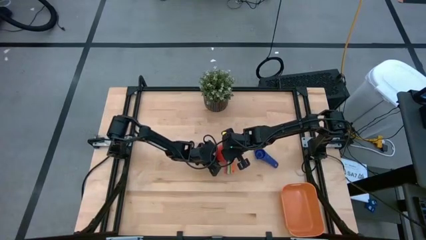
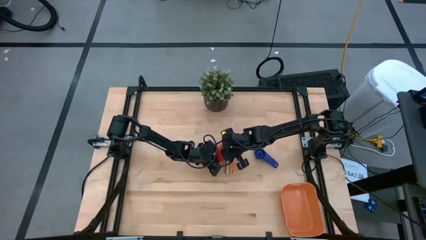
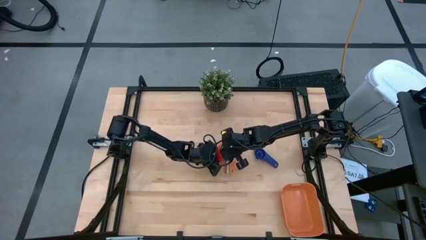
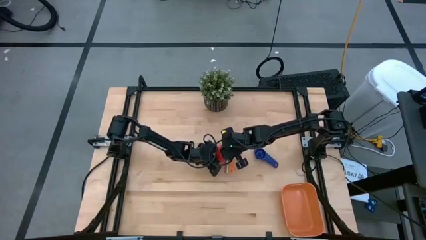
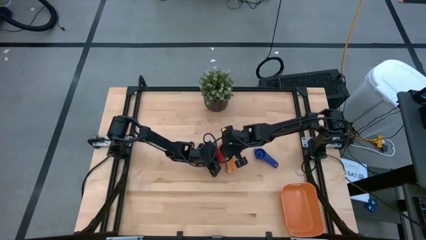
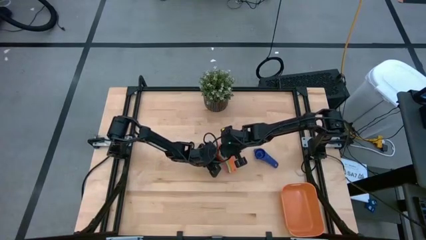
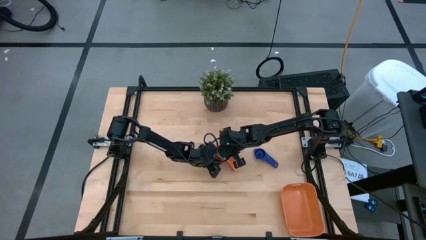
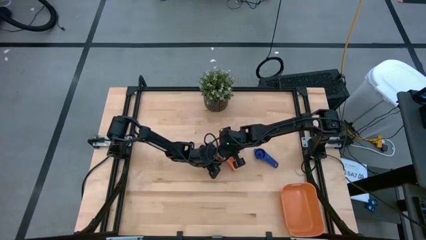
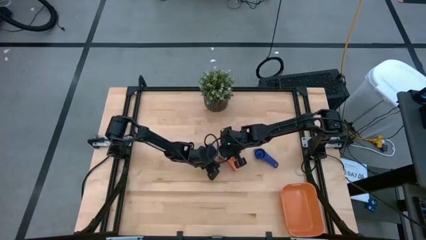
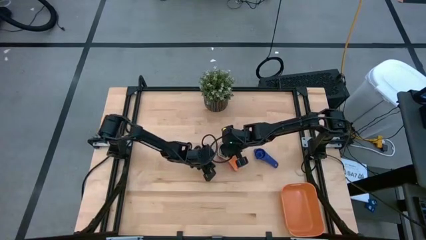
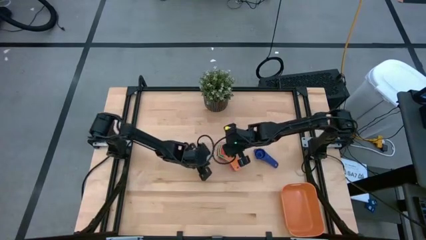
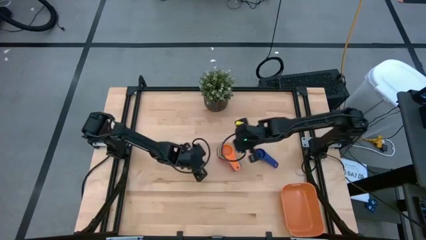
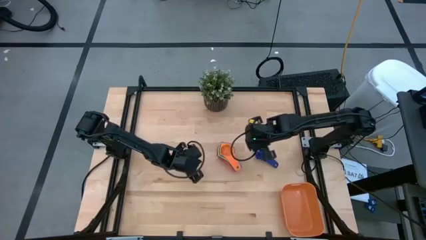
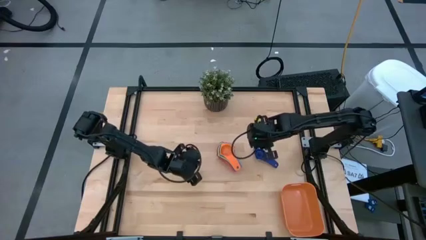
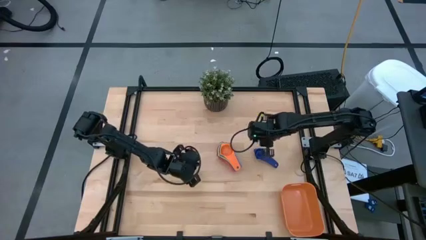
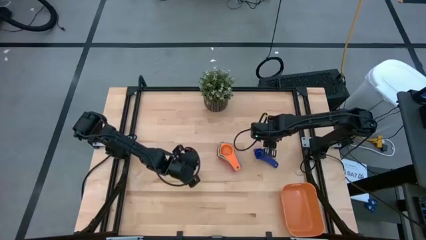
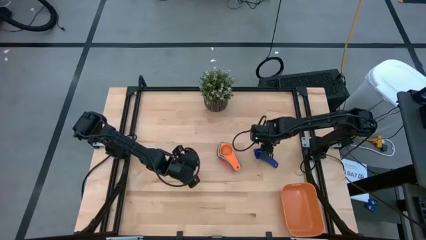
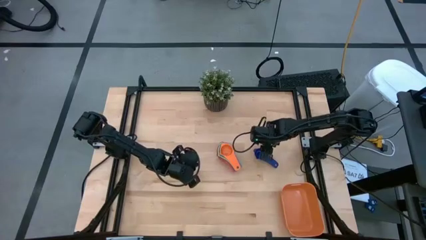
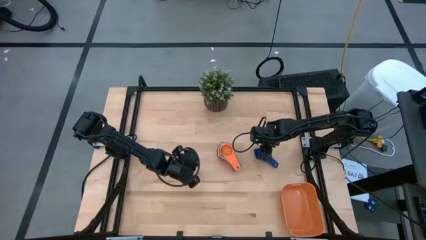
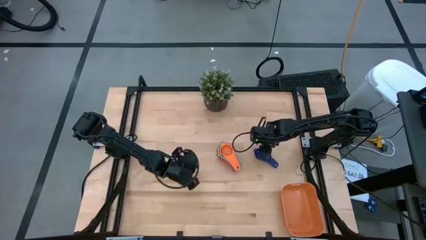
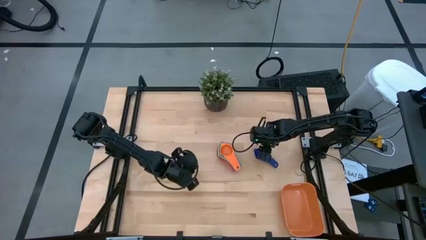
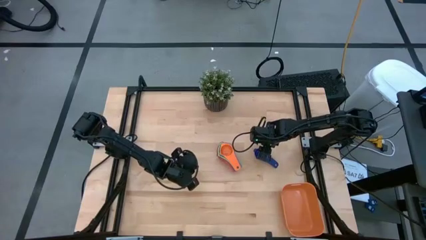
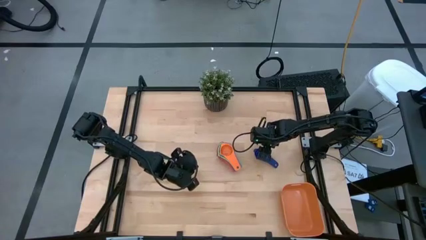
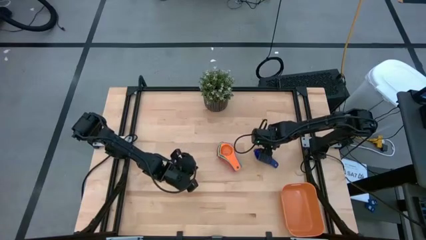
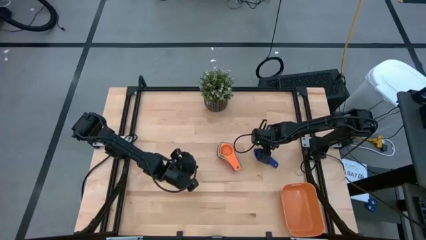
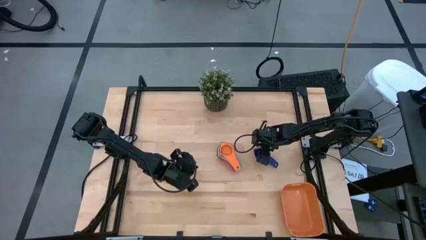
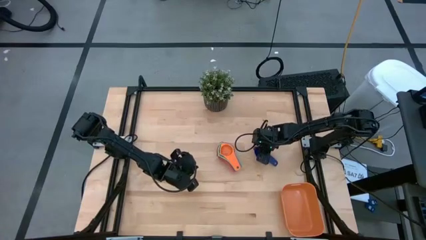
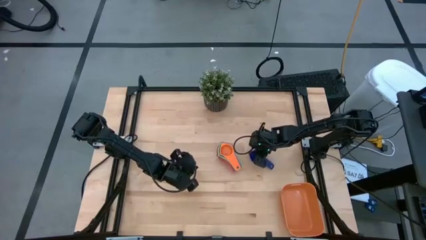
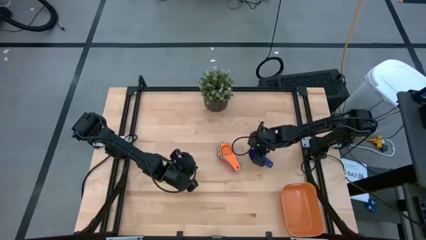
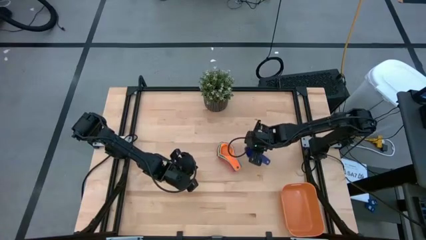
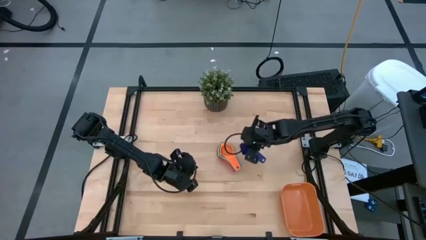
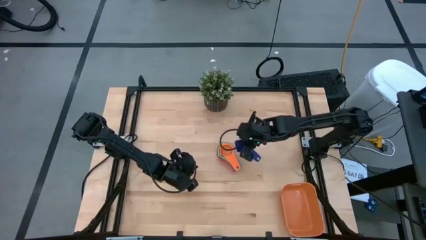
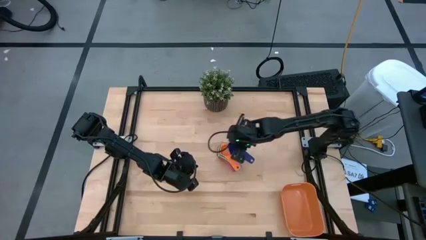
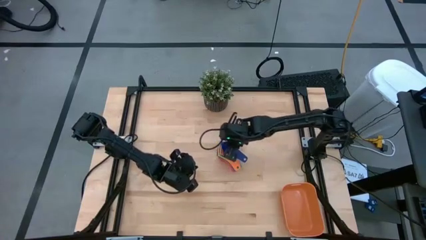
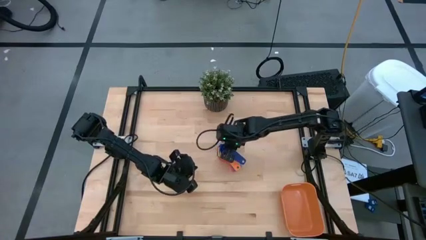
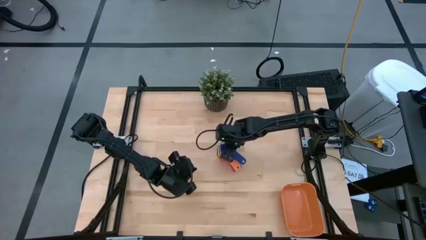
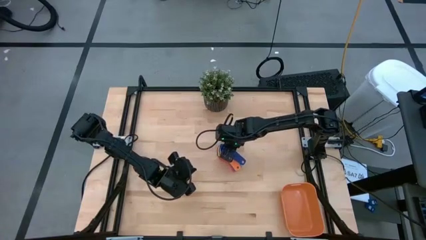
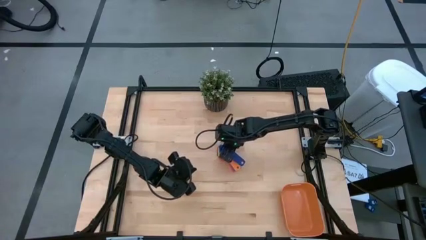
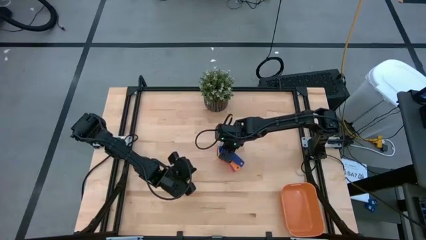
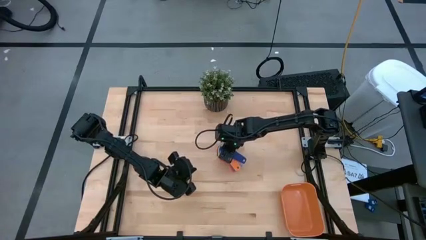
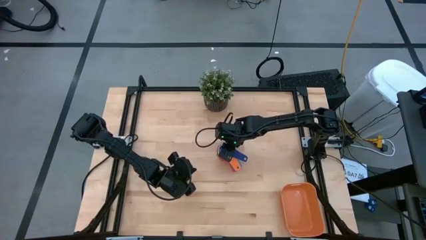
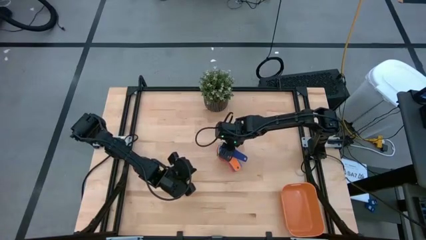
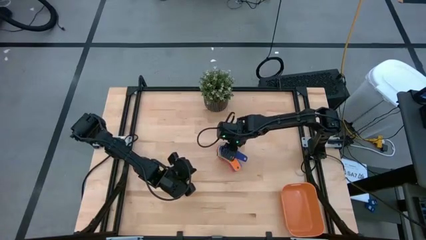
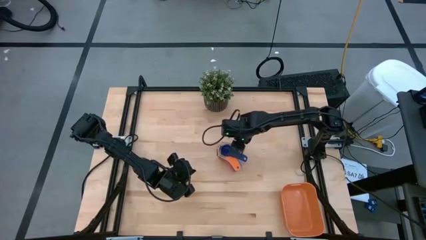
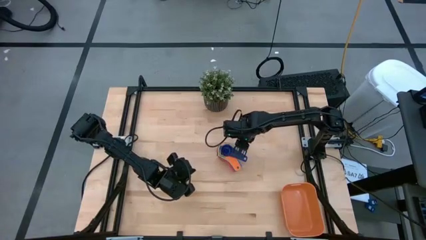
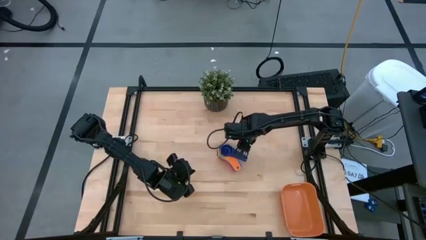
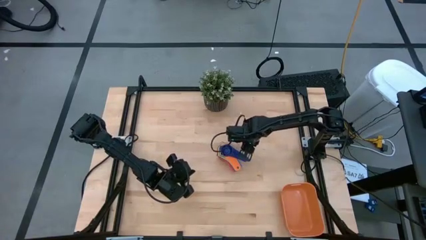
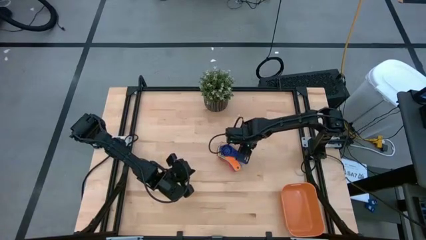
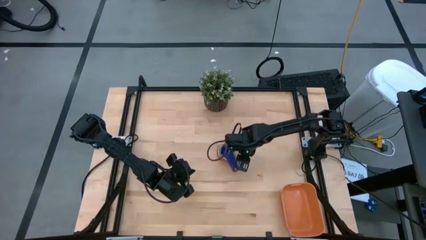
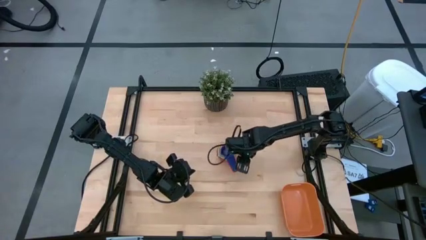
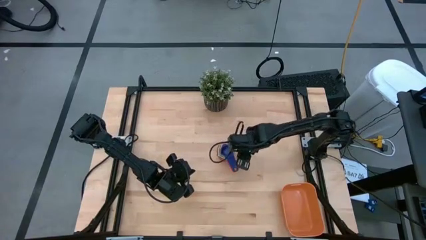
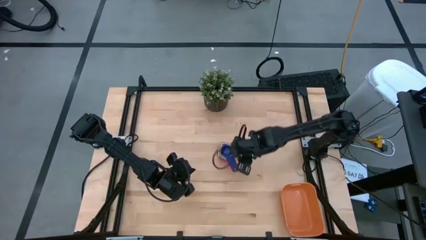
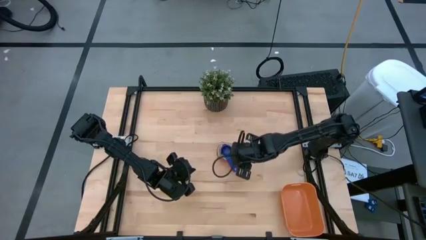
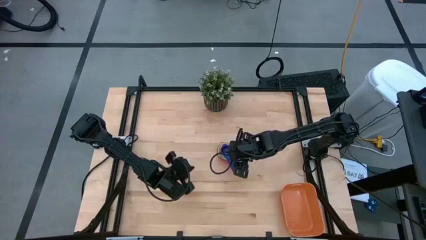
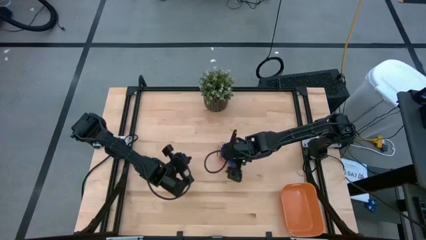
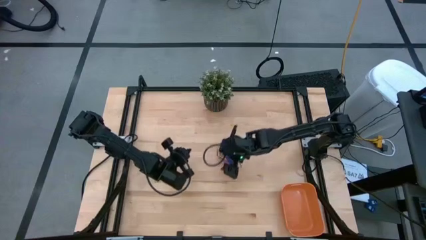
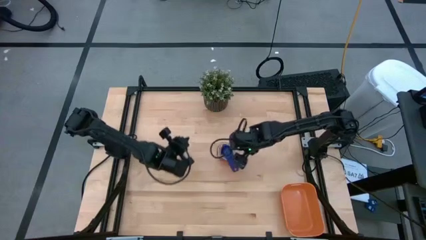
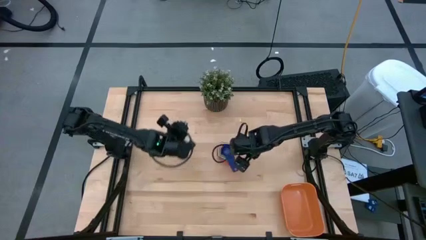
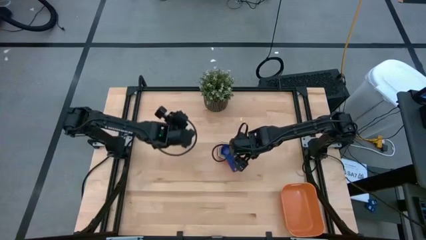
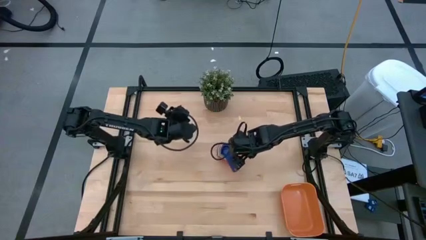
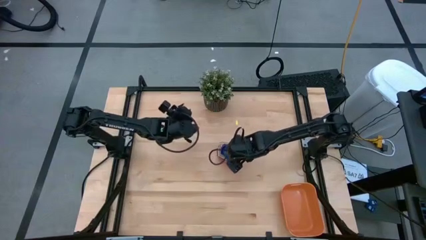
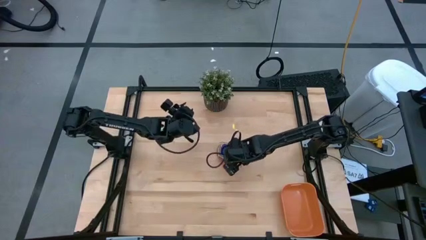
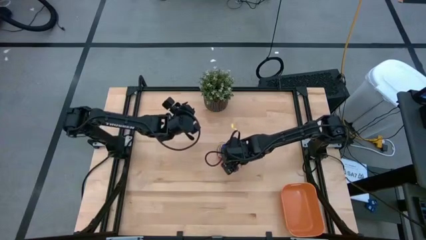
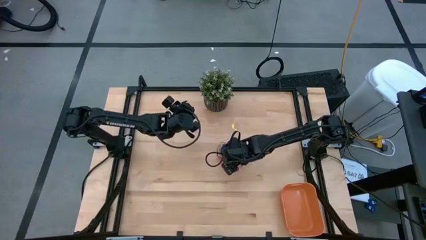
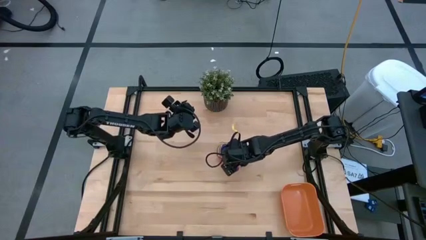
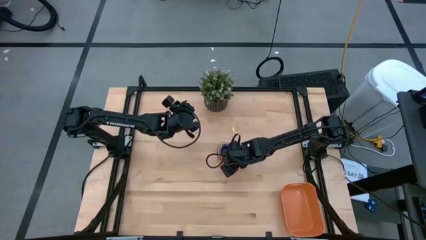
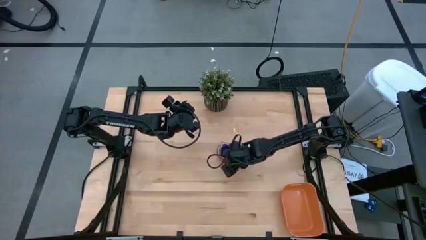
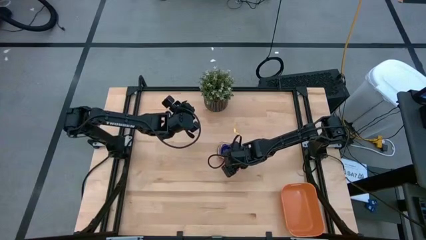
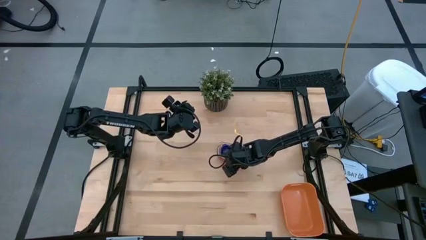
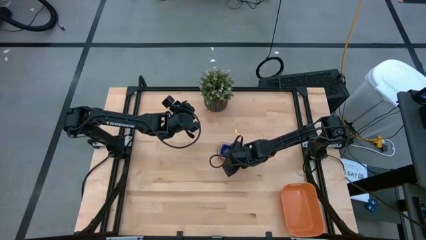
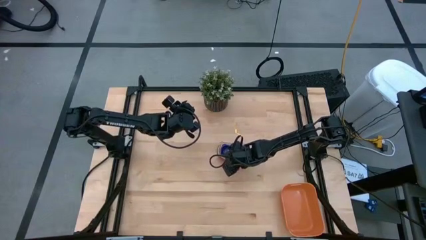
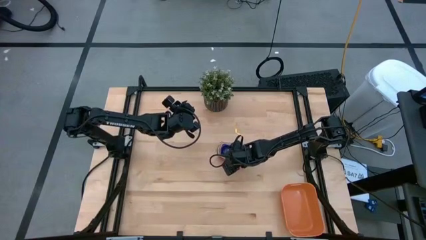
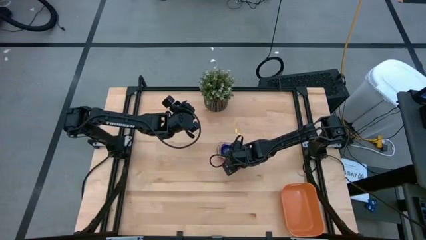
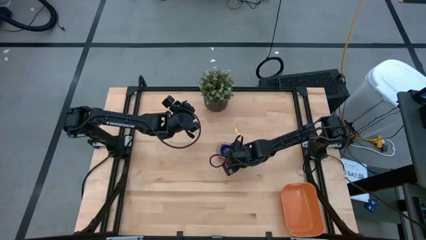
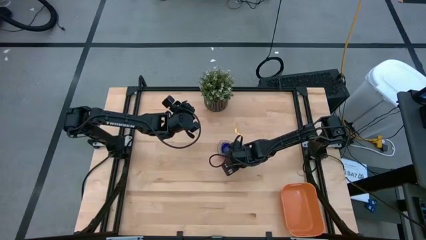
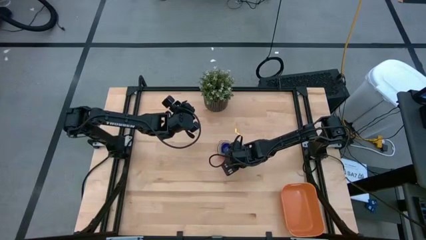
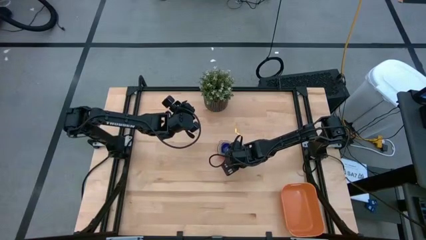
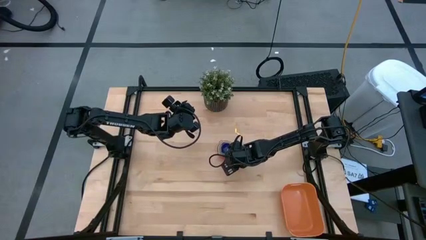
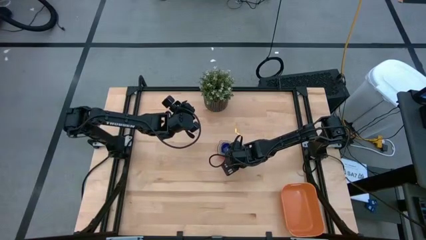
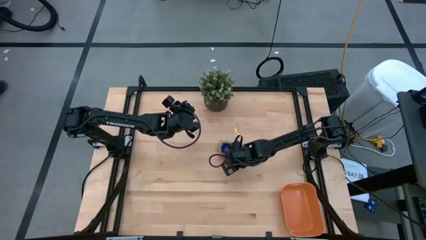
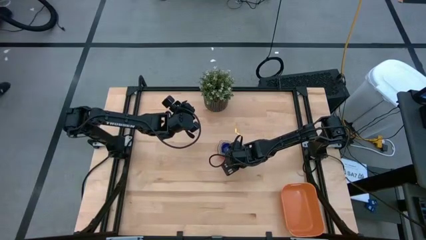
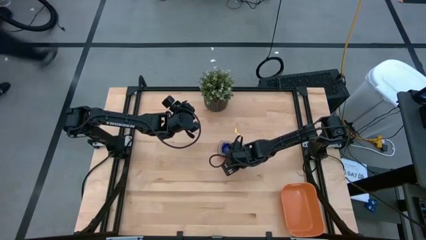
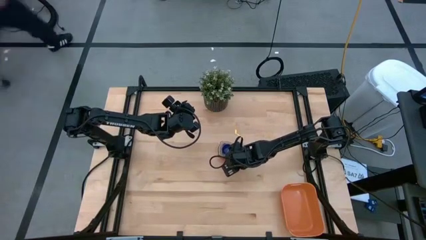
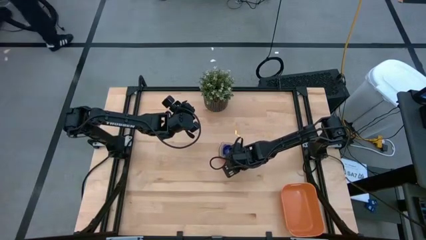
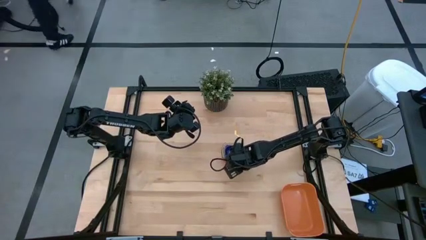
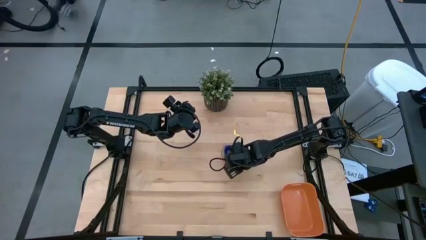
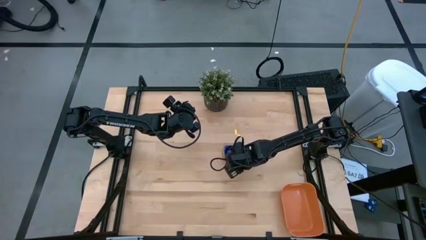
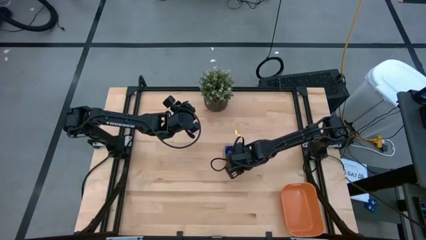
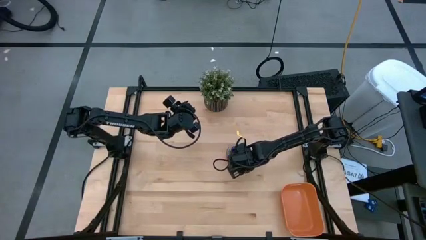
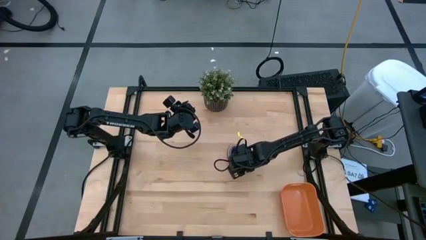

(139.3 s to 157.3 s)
Task: Nest measuring cups in basket
Put the nested measuring cups into the orange bin
